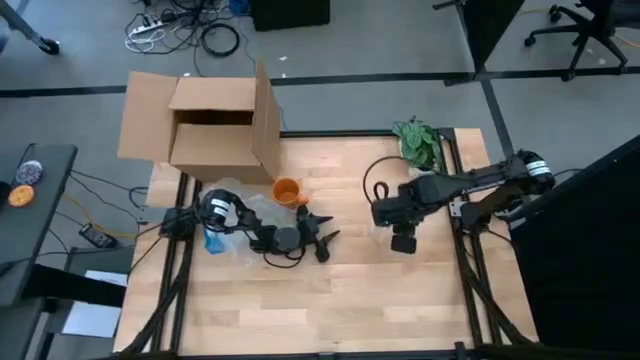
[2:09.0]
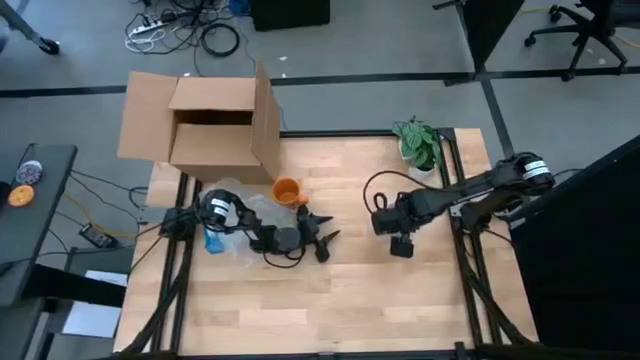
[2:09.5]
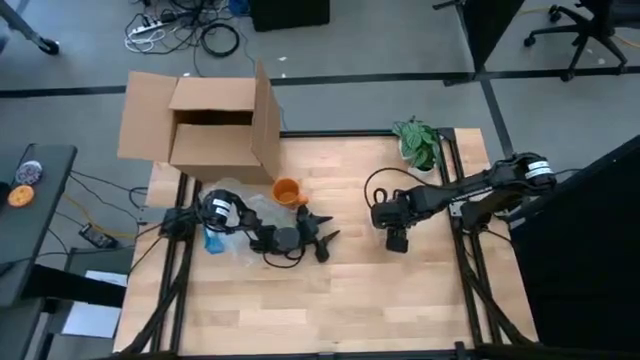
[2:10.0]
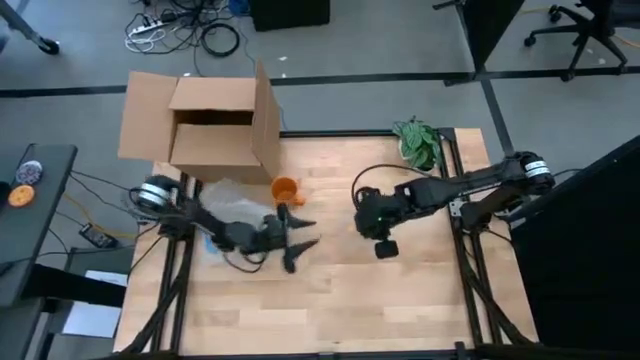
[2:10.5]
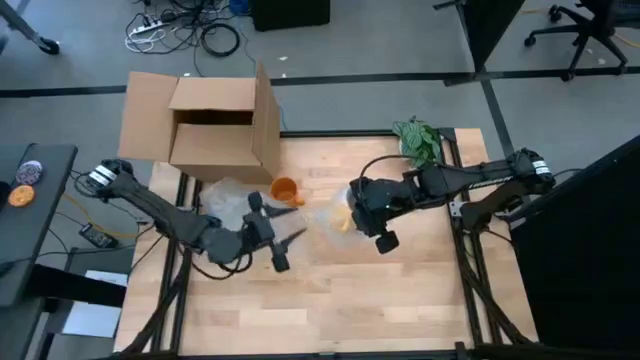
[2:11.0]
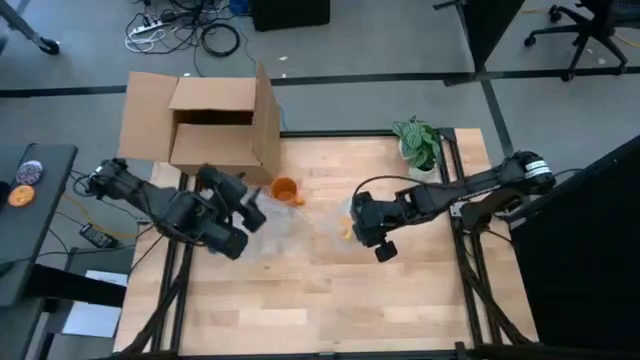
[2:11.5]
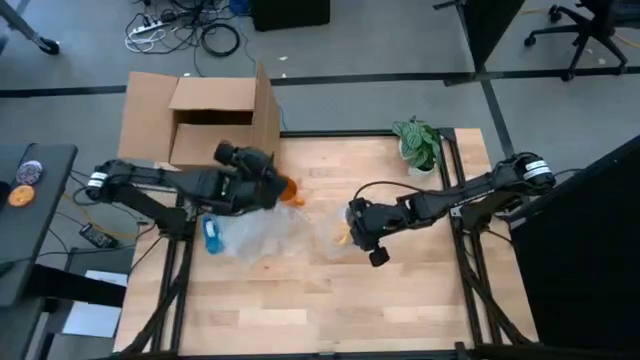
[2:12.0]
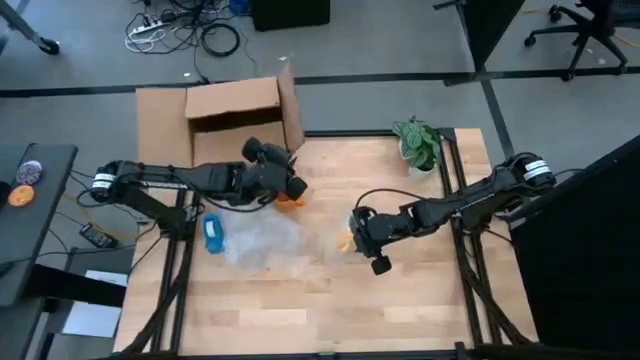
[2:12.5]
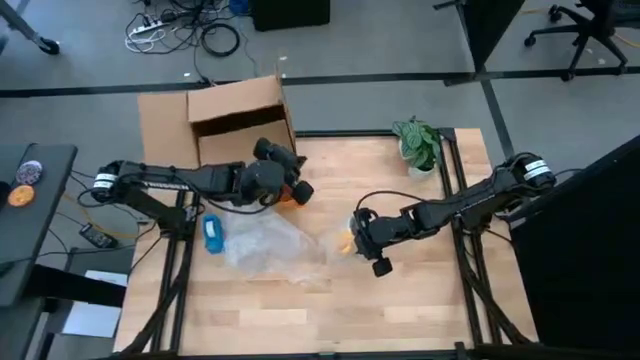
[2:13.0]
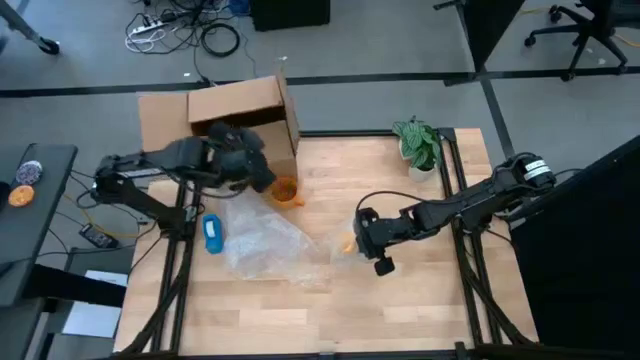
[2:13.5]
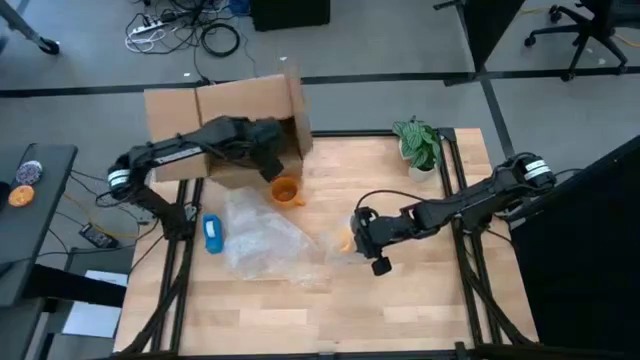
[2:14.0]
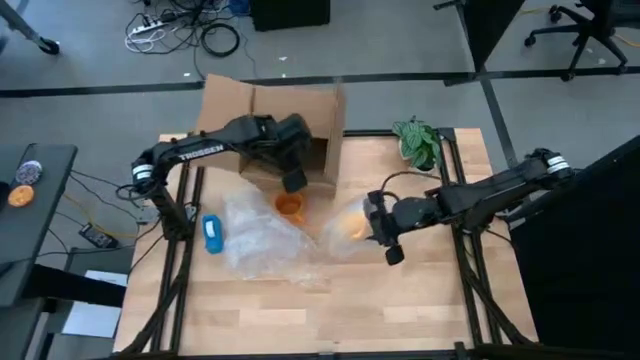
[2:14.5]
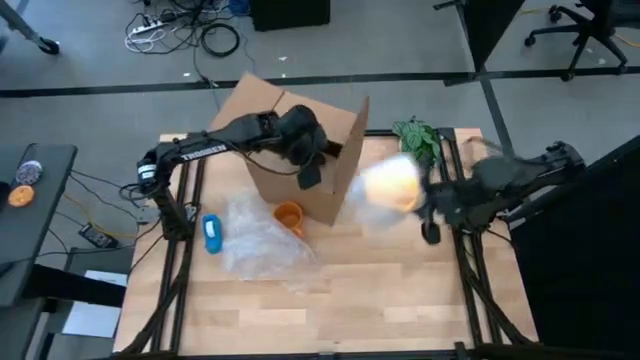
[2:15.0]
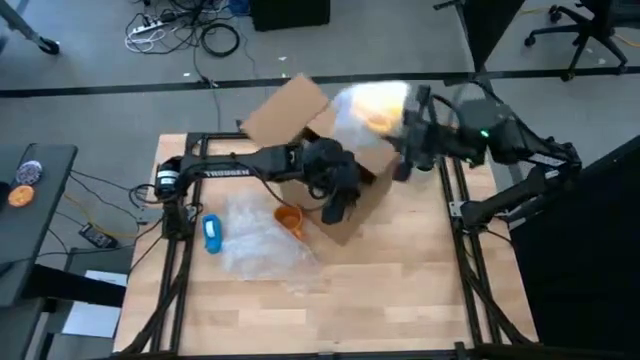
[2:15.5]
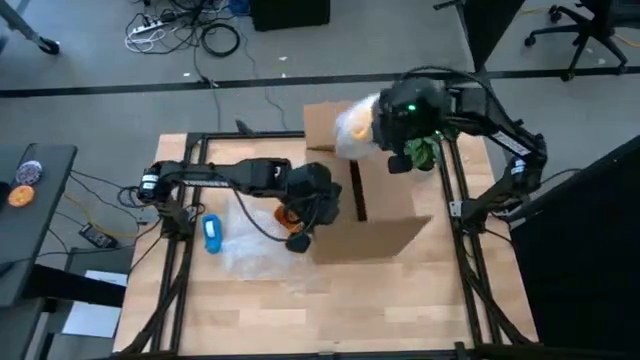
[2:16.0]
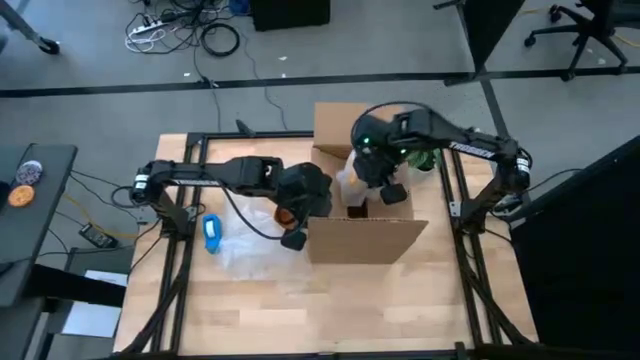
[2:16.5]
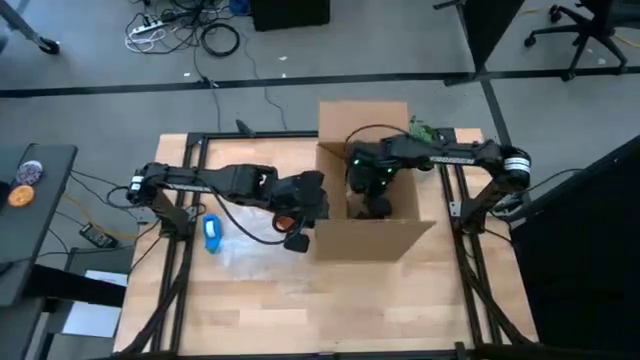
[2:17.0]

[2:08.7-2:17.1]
Task: wrap mug
Put the wrapped yellow mug into the cardboard box

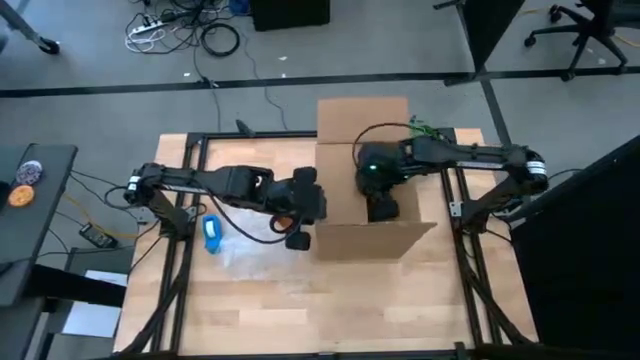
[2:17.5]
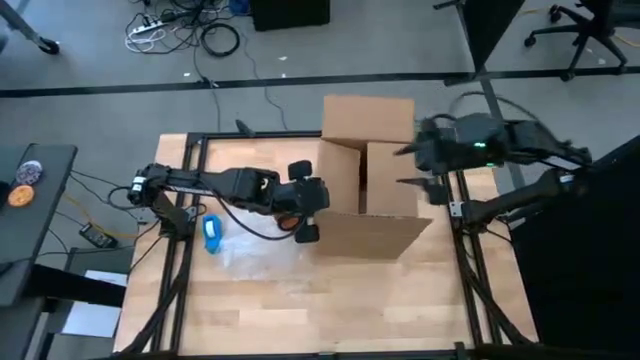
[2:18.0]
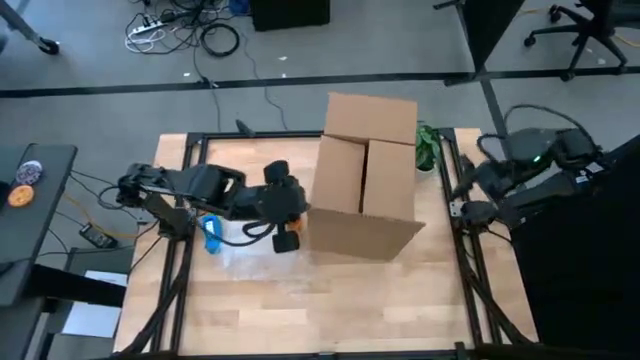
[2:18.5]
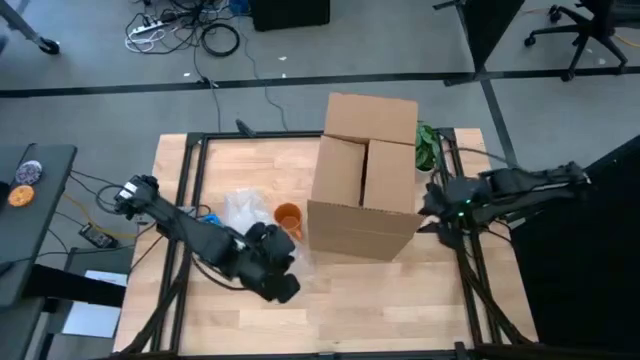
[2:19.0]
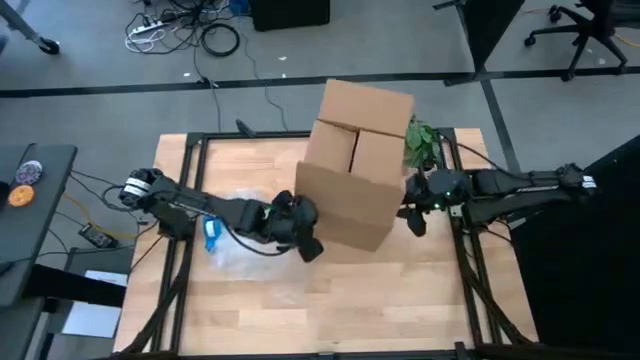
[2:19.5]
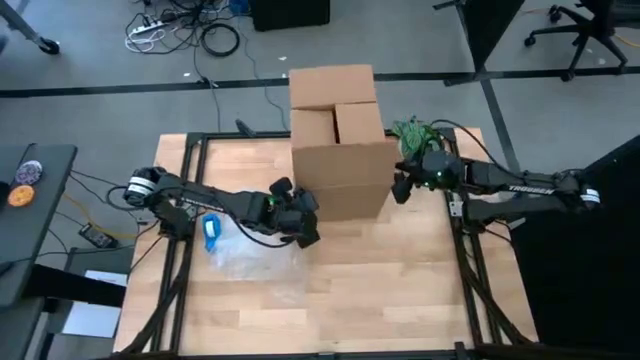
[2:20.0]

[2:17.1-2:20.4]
Move the cardboard box to the top

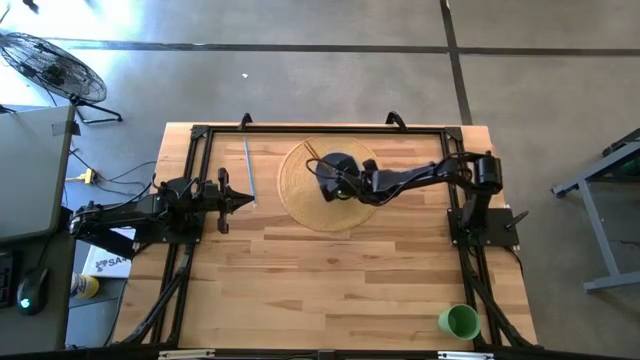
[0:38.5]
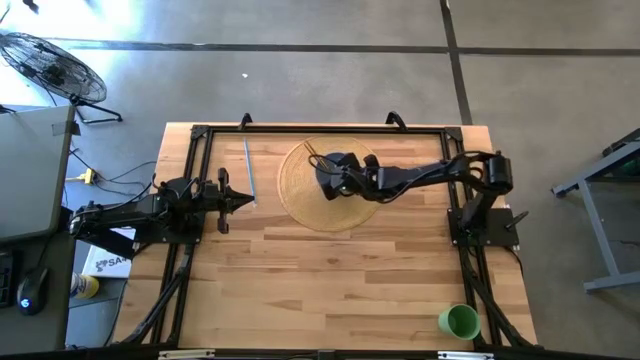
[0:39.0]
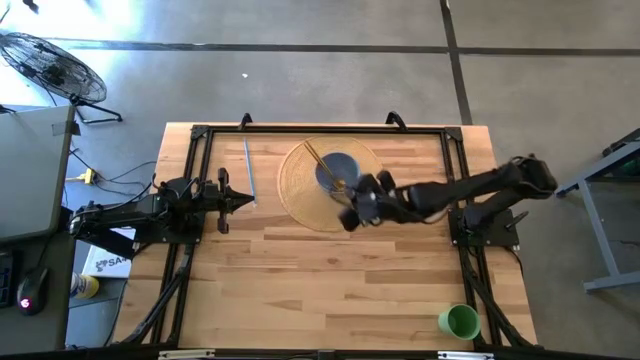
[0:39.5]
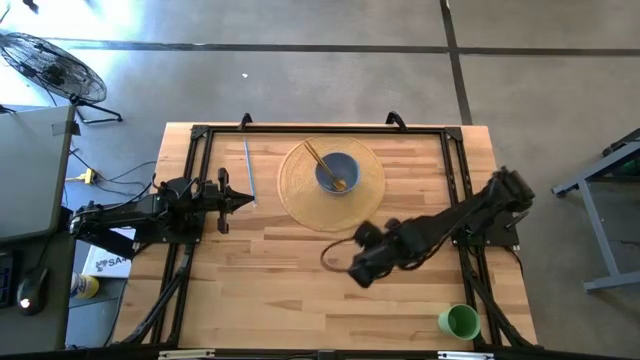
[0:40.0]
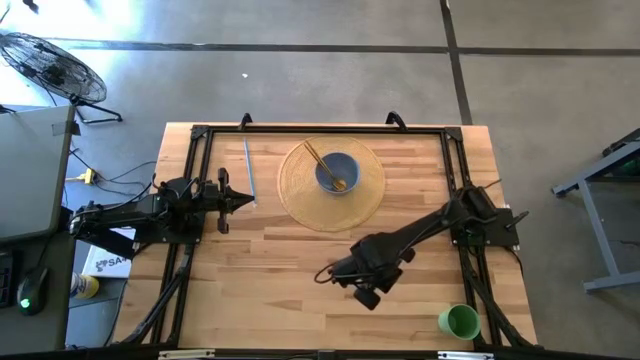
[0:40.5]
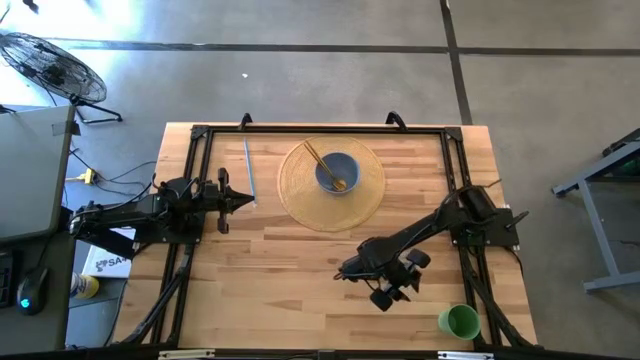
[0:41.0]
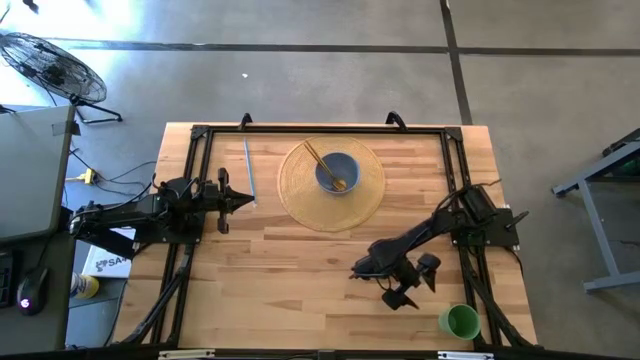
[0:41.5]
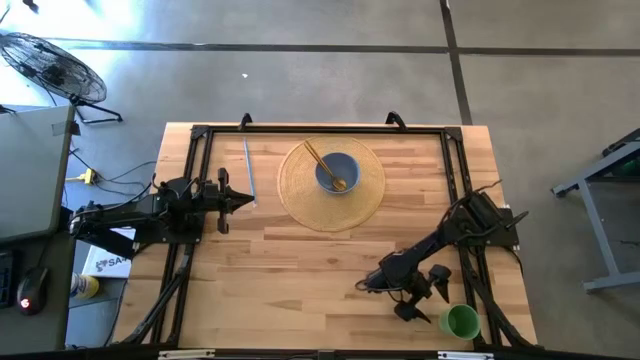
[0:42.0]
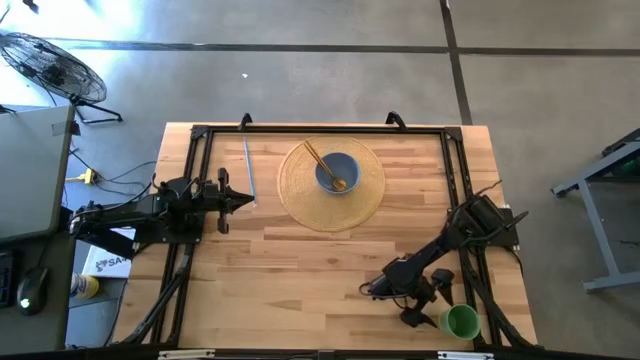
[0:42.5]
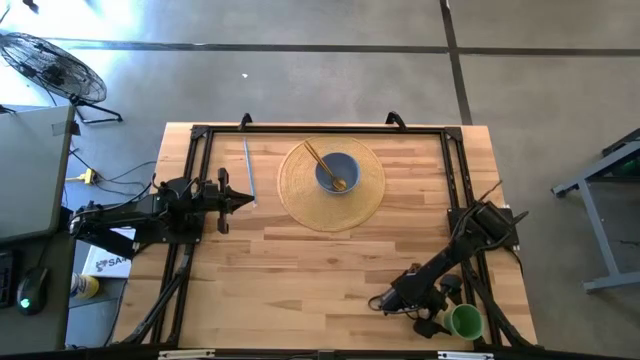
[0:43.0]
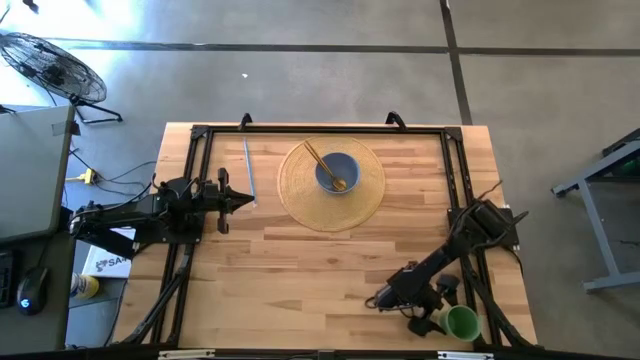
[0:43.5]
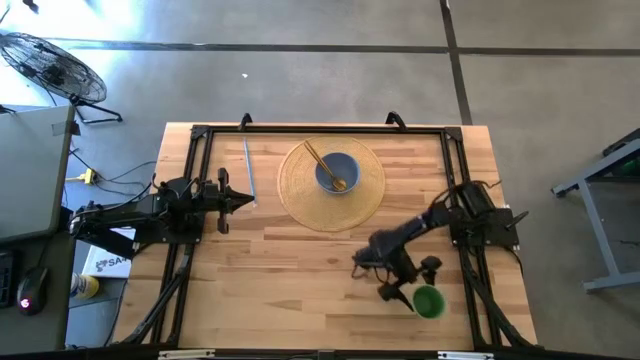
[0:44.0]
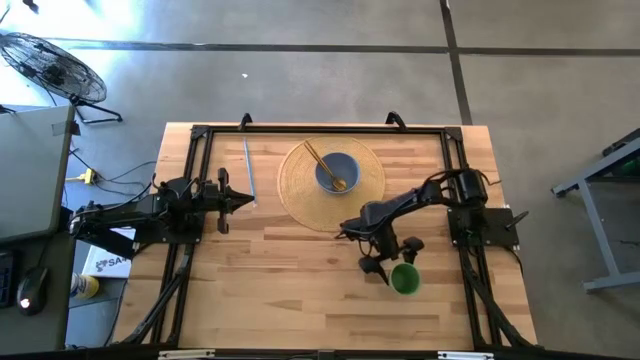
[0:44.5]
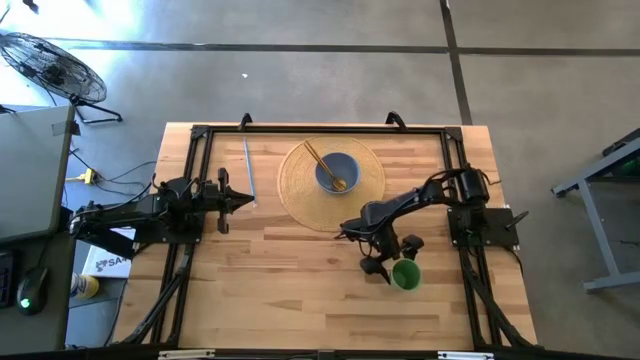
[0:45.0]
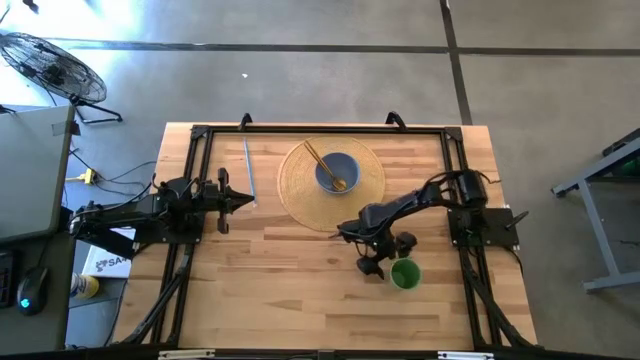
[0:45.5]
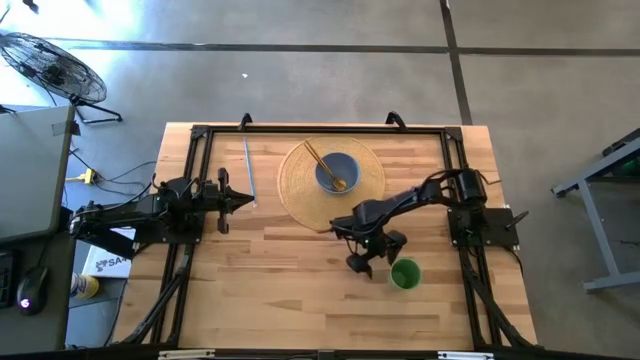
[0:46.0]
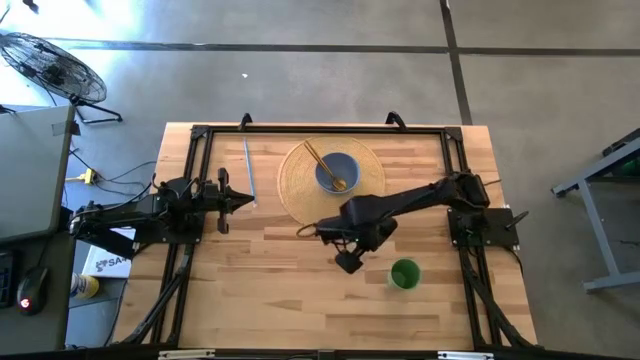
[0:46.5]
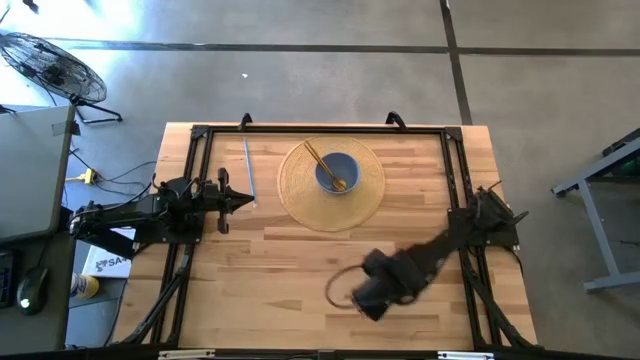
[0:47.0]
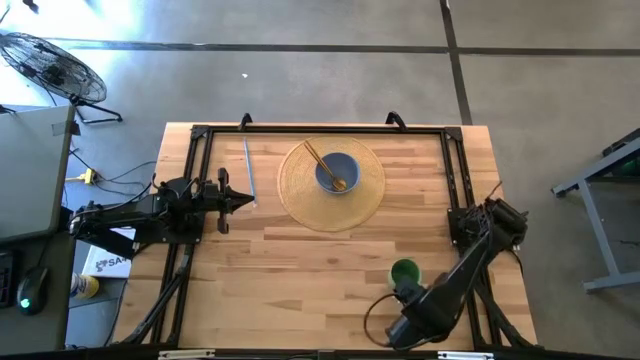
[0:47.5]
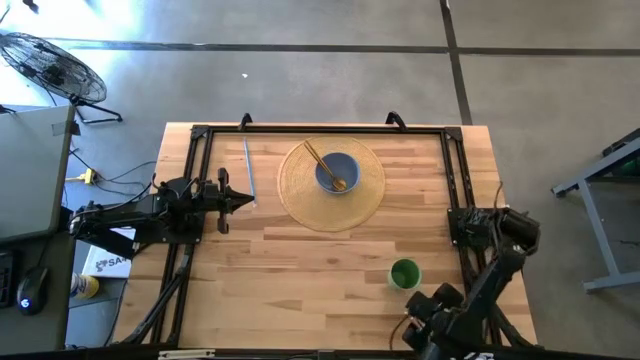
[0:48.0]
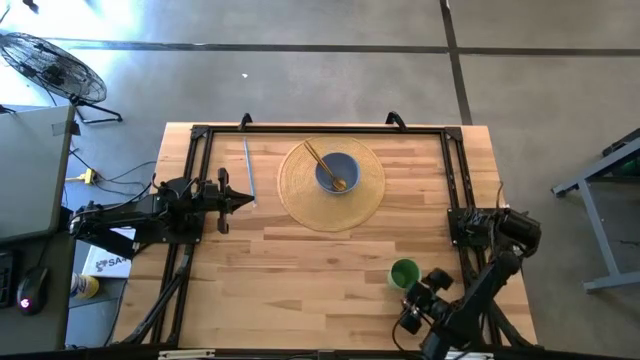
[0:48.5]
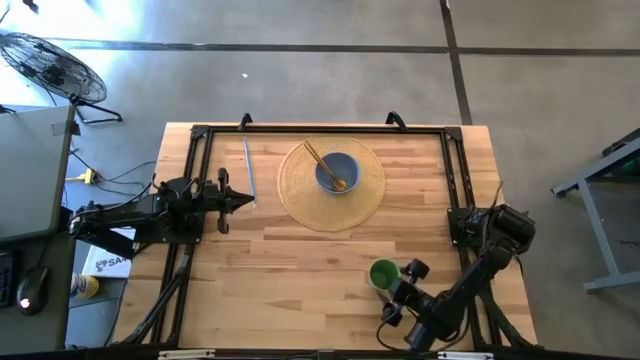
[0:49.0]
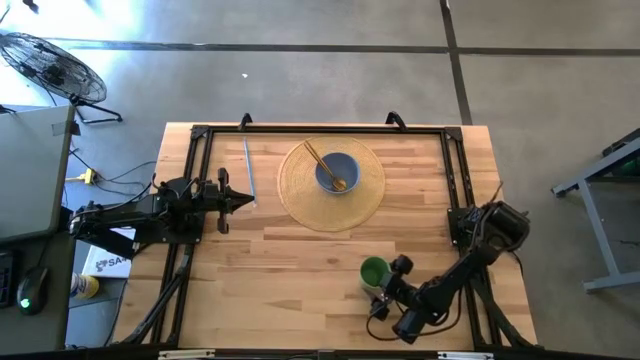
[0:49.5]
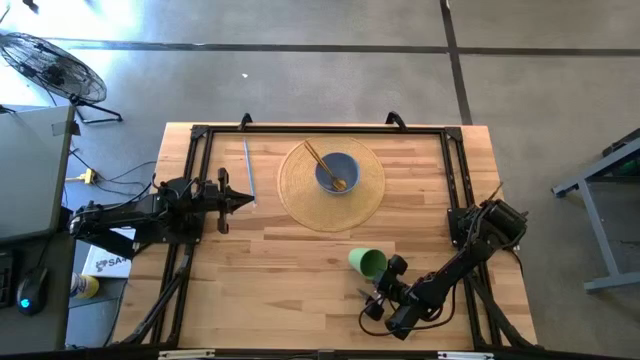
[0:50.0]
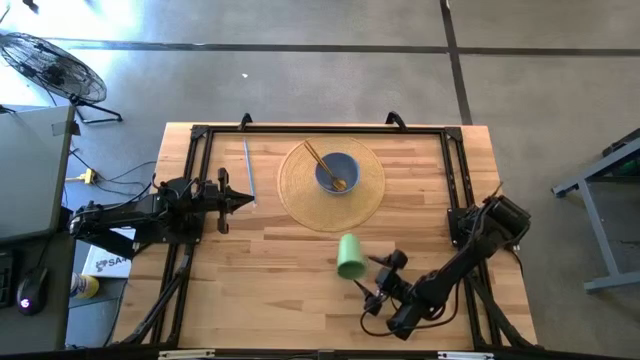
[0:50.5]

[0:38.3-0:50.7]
Task: Pick & Place Utensil
Put the green cup to the top right of the blue bowl on the brown mat
